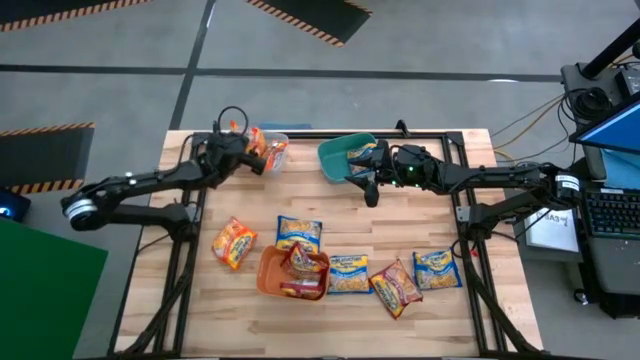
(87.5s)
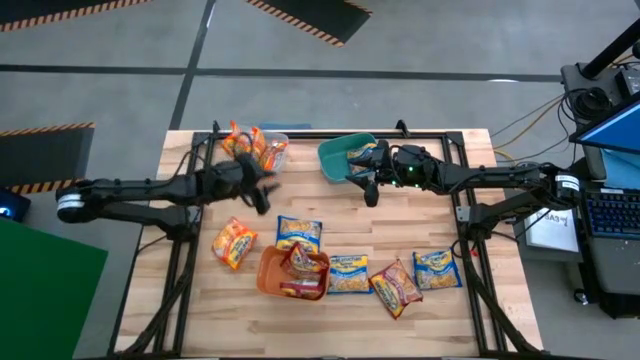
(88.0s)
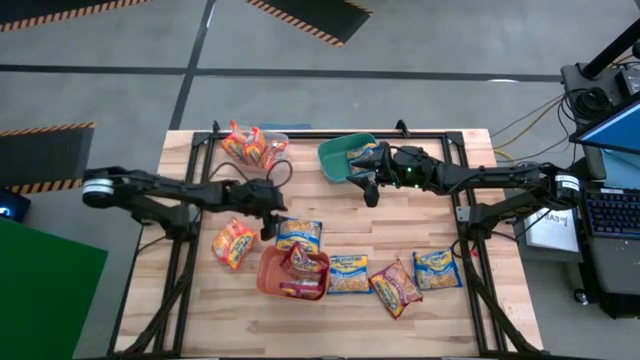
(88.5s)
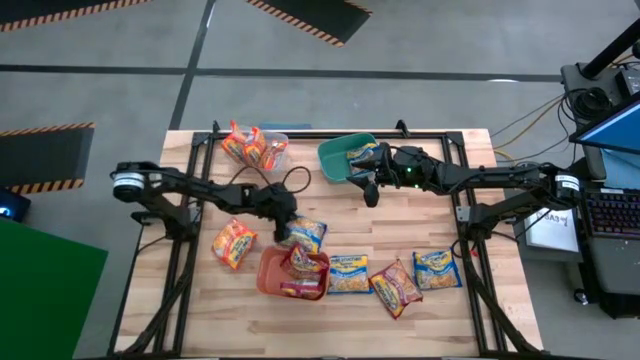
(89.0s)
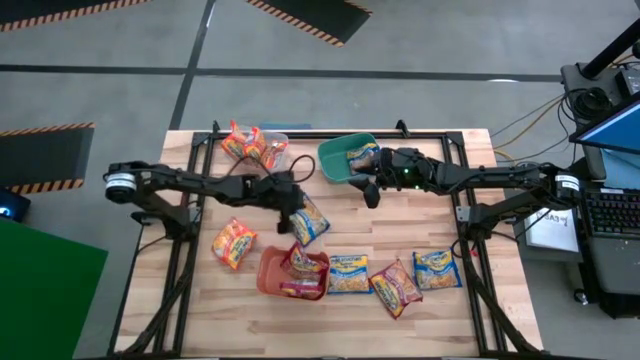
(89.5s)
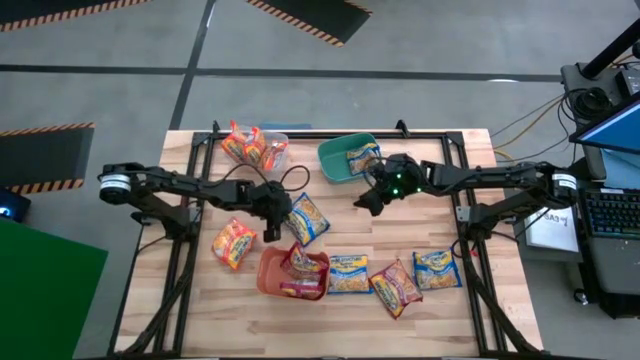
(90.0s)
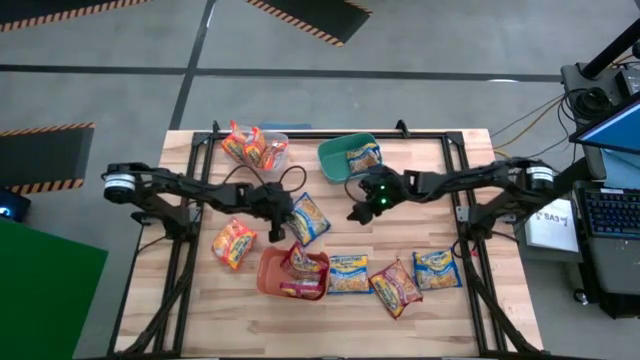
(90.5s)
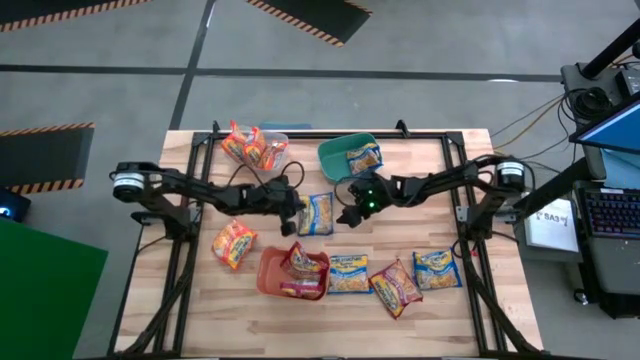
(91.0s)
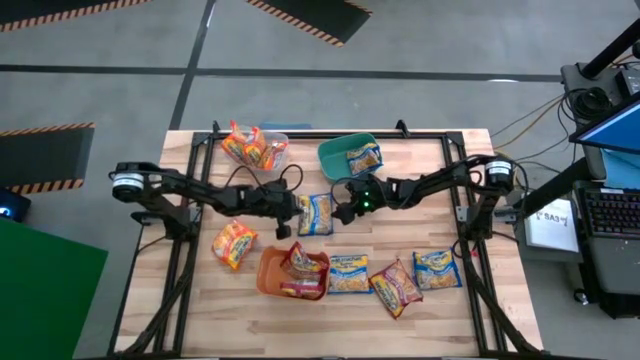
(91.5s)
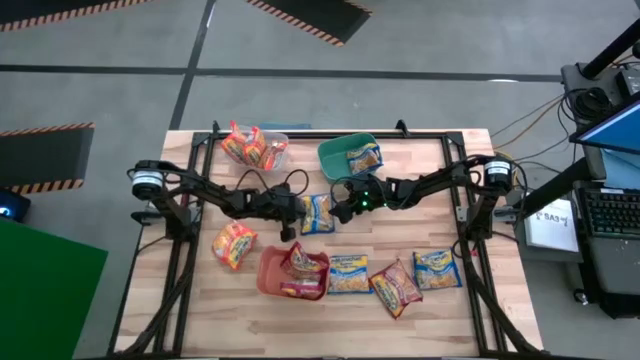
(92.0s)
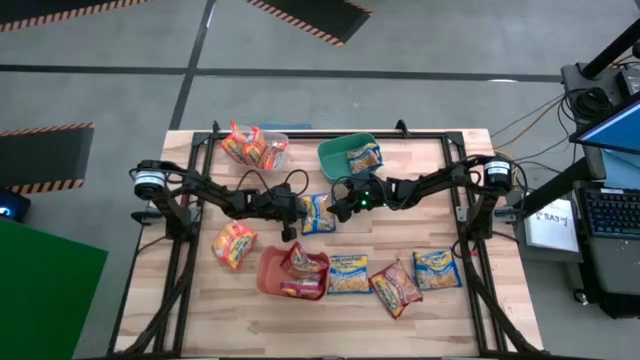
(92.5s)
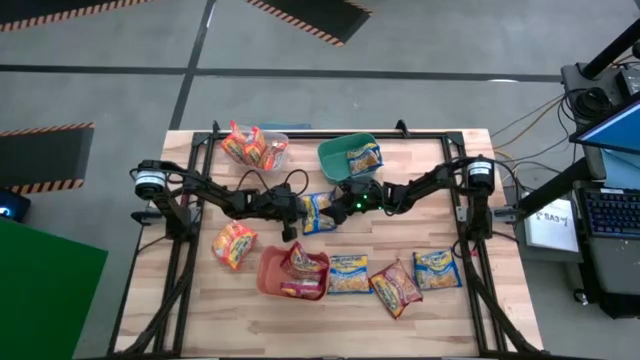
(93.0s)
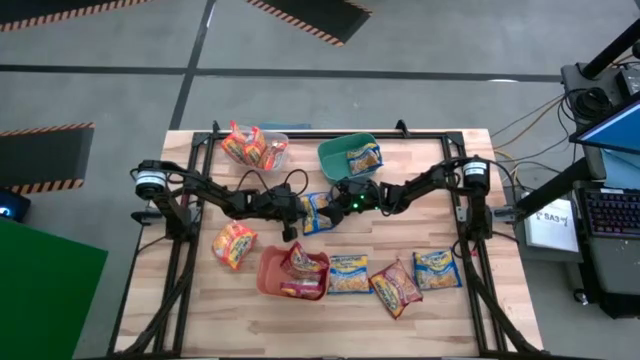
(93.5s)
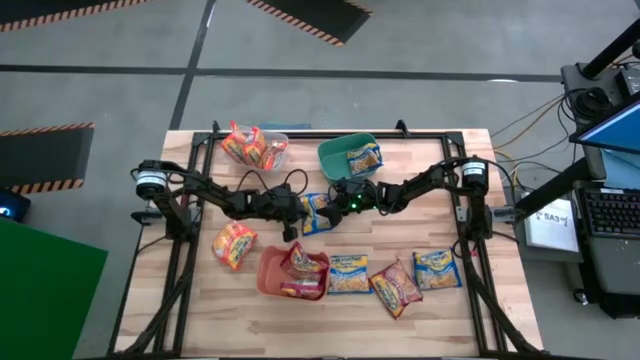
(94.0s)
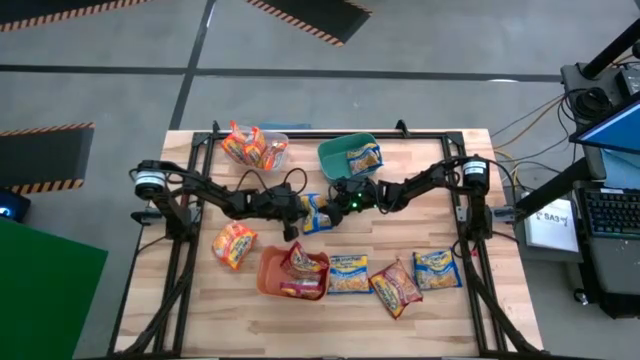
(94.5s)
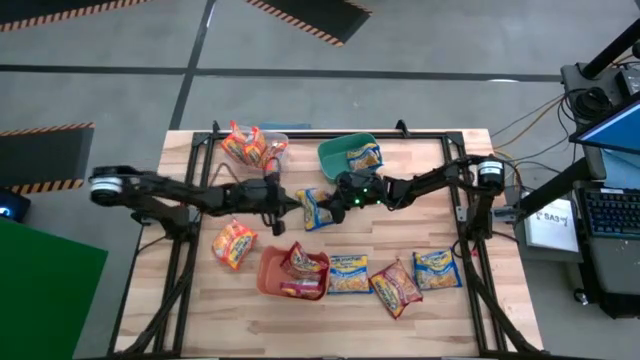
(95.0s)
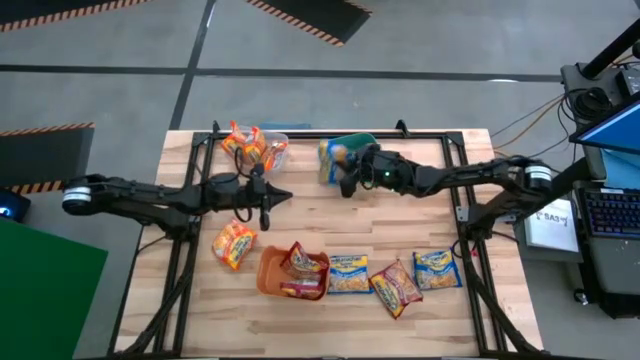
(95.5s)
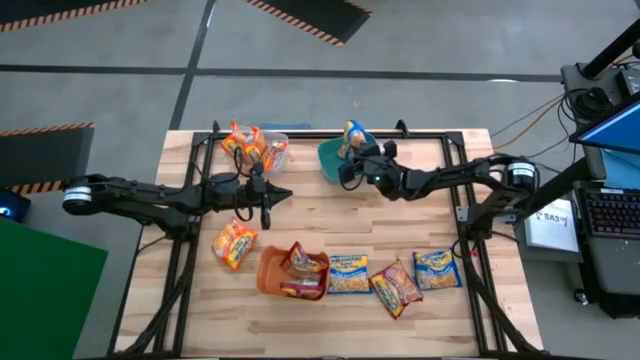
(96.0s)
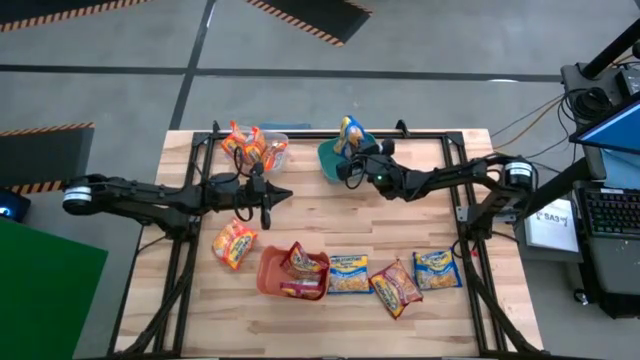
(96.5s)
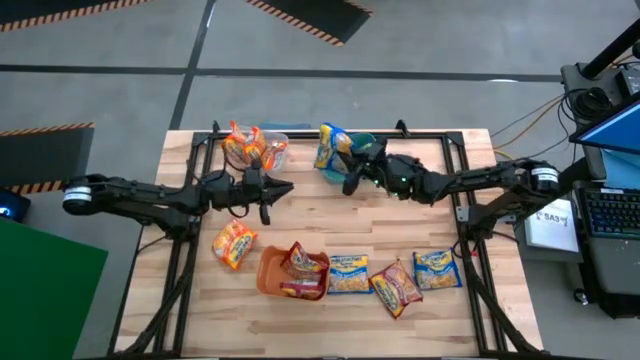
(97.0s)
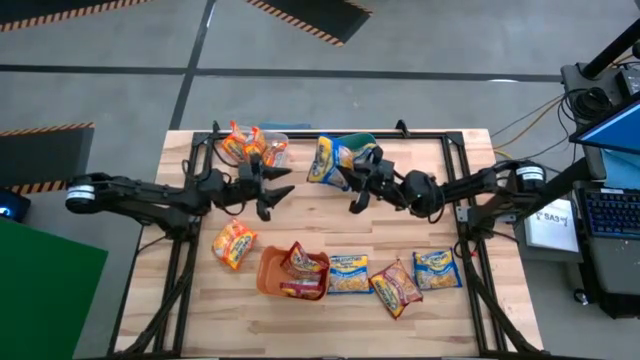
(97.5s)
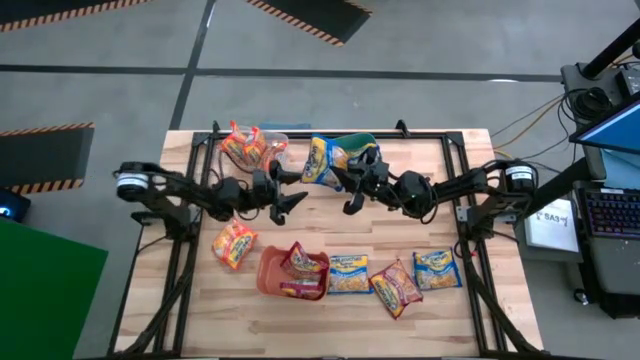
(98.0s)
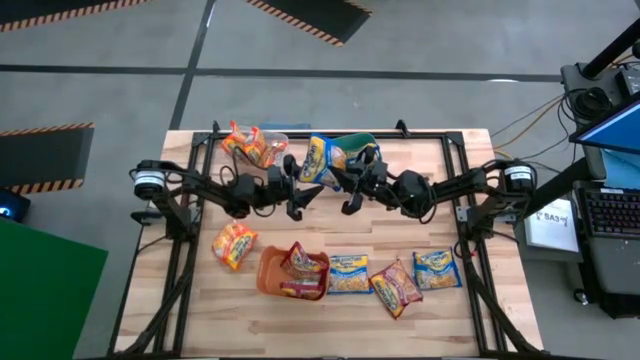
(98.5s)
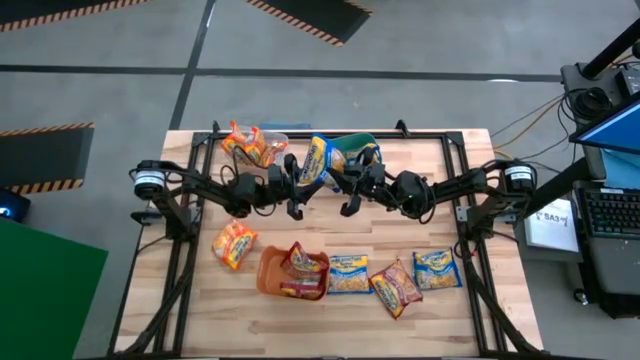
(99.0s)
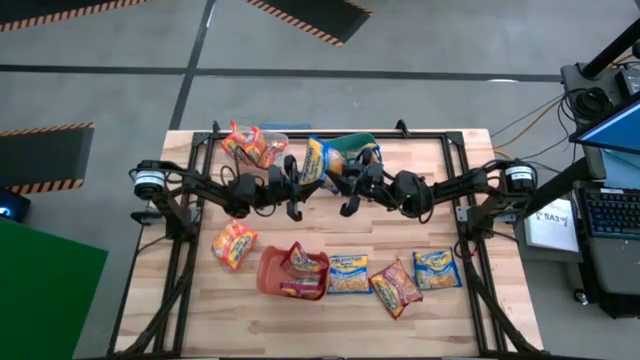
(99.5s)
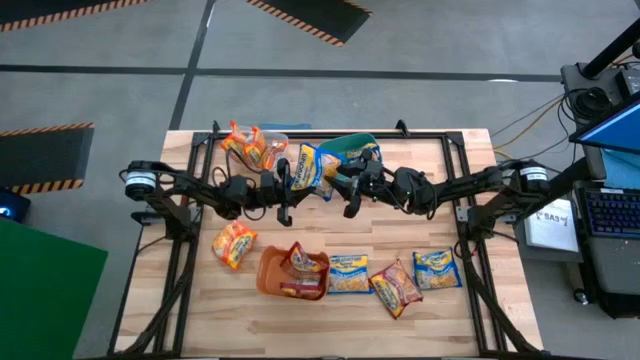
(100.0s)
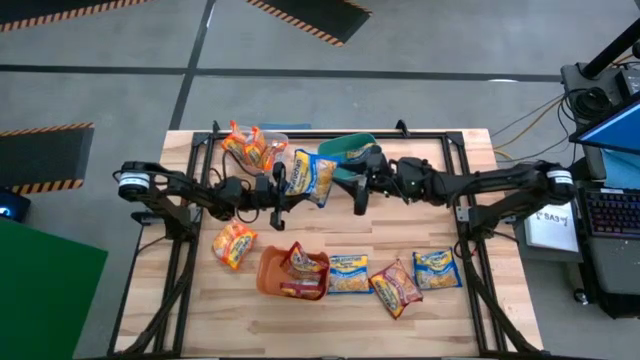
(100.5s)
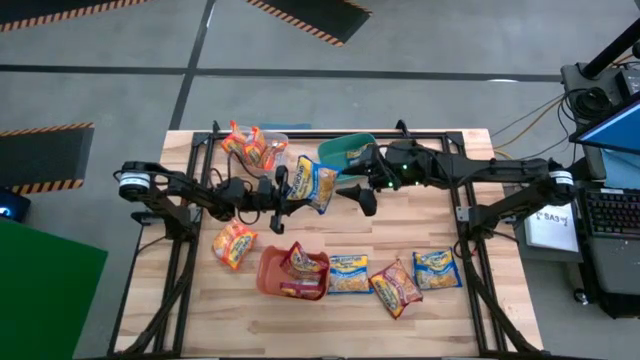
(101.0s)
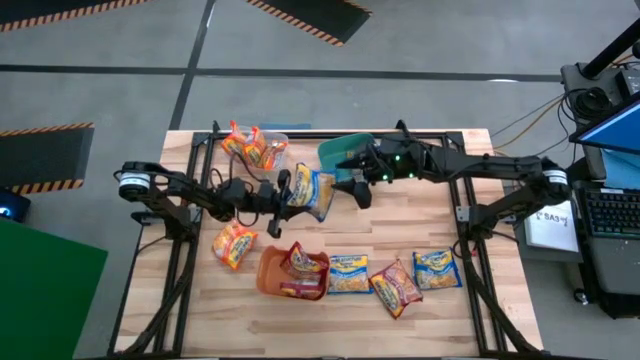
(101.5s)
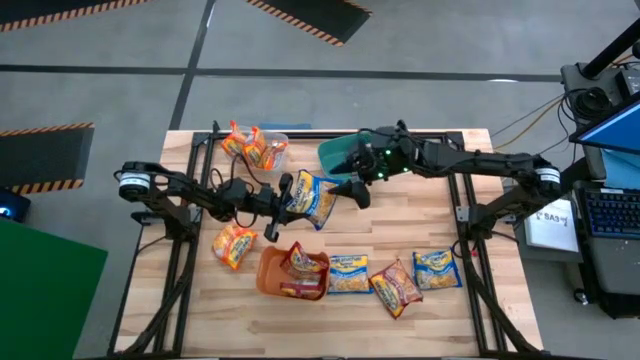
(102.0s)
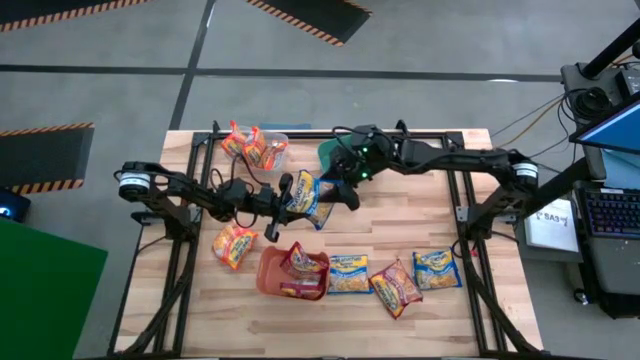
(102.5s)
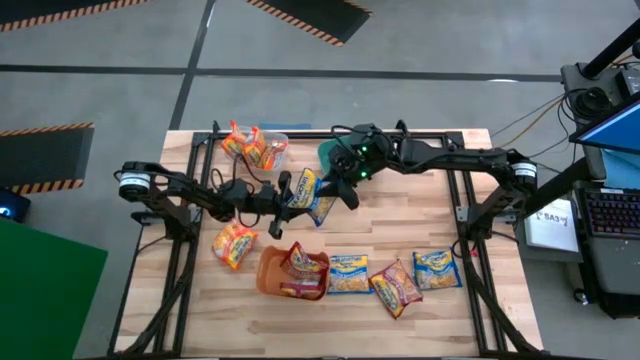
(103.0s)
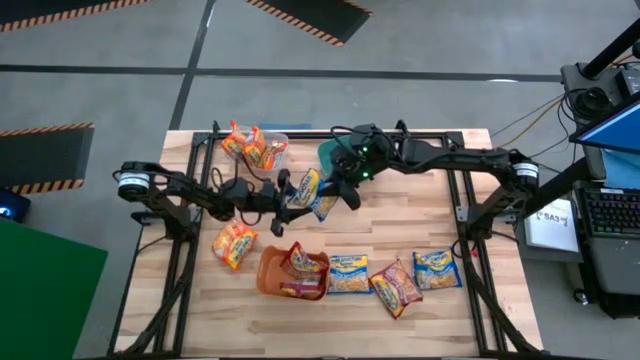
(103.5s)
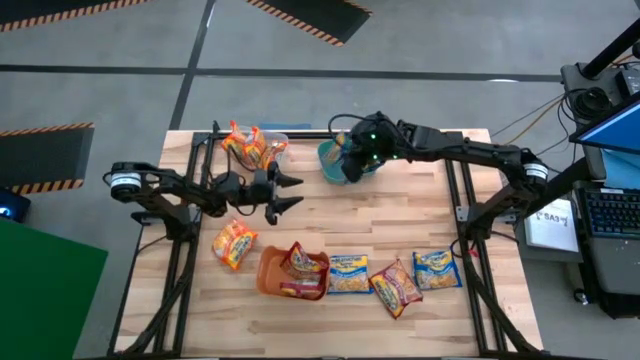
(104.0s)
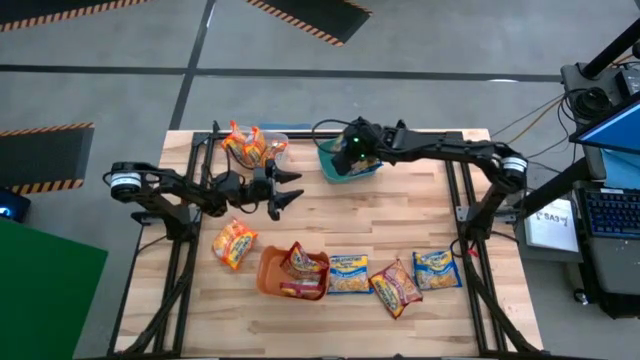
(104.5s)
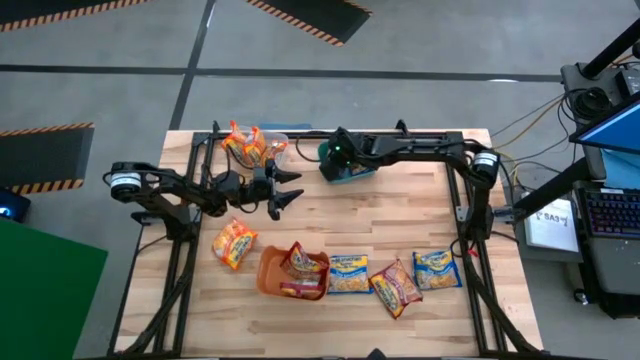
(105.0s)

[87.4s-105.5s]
Task: Sort Maruchan noodles
Put the blue noodle pack into the green bin

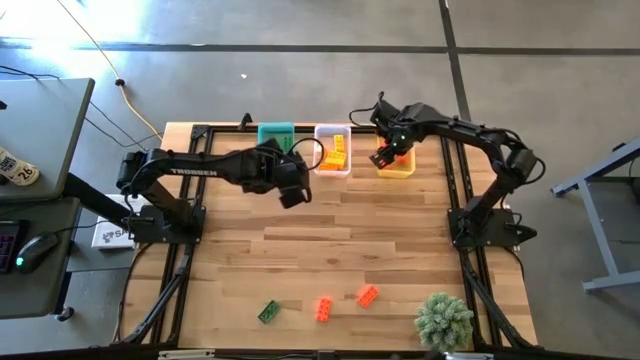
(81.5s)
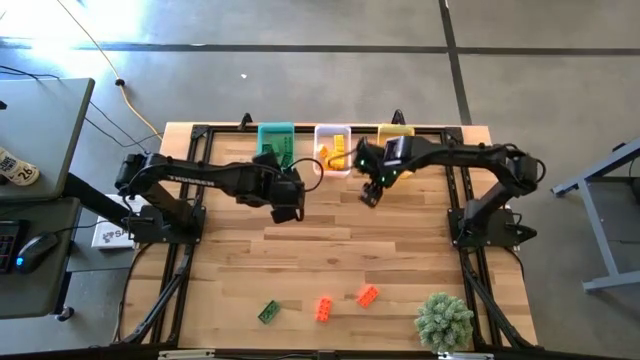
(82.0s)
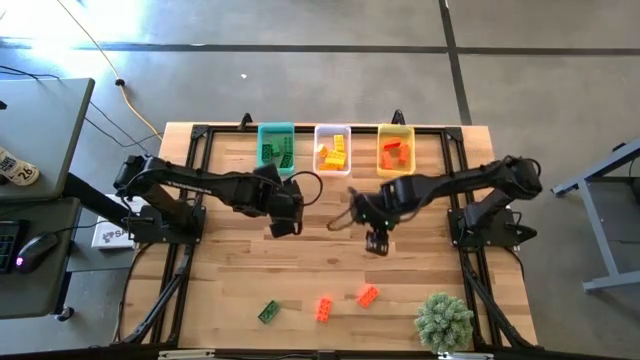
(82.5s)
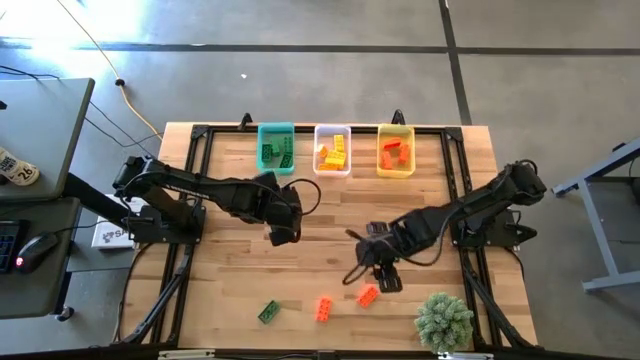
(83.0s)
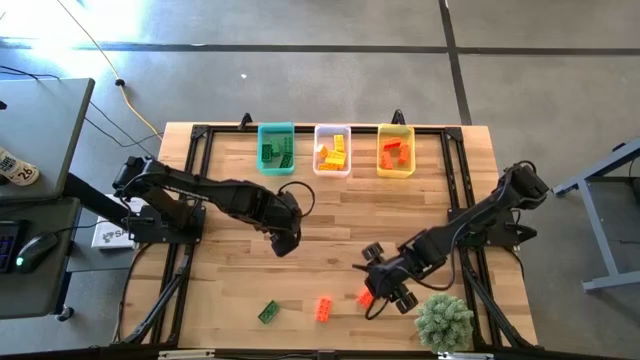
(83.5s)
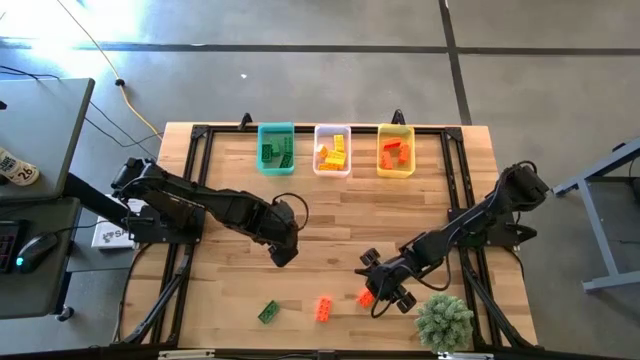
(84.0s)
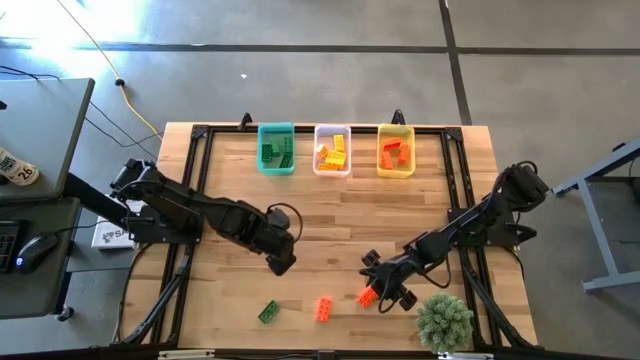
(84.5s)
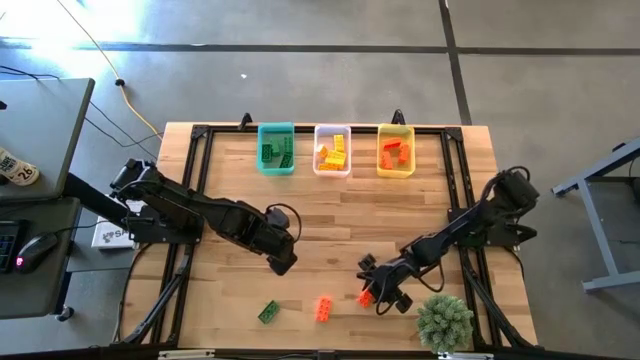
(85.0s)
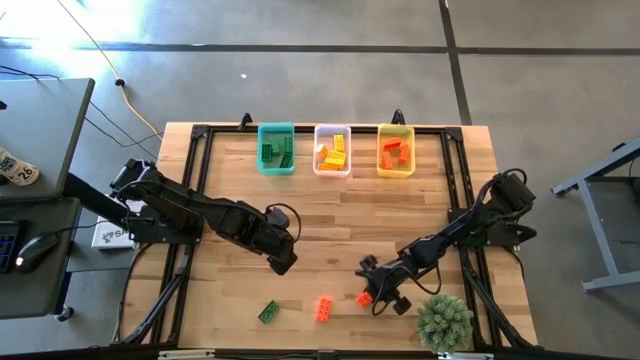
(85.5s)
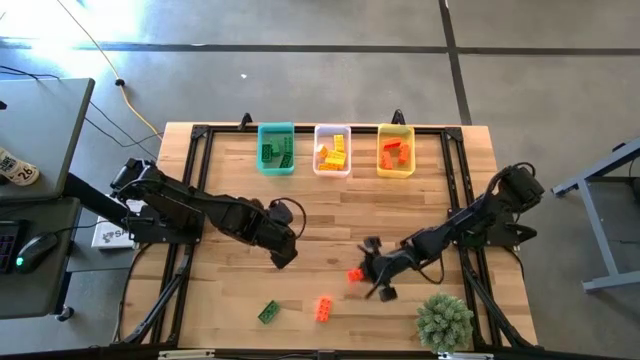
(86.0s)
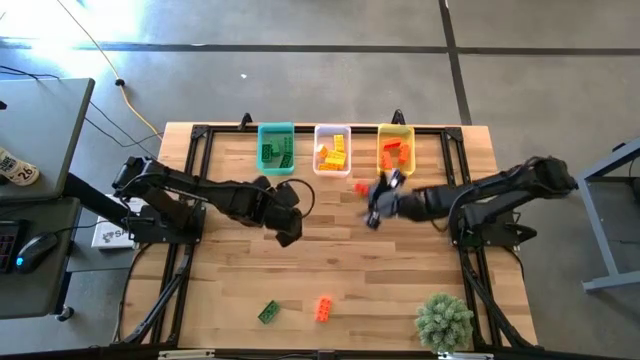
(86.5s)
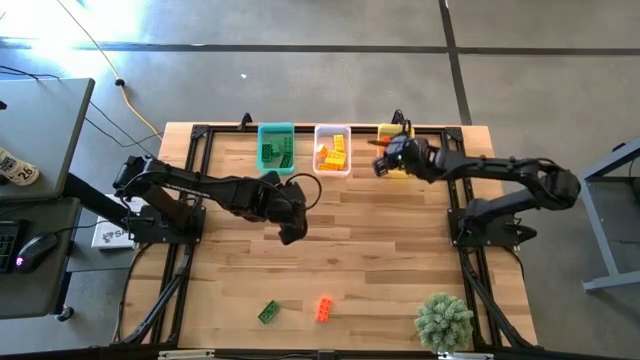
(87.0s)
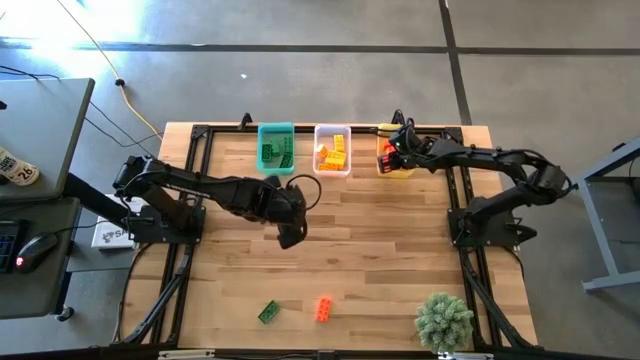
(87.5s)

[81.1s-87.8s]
Task: Sort & place blocks by color
Put the orange game piece into the yellow bin
